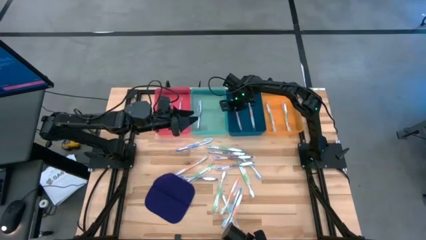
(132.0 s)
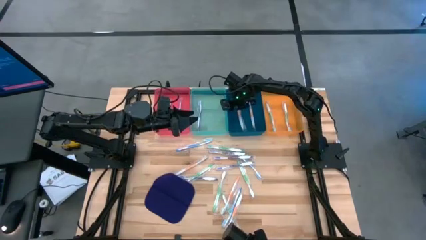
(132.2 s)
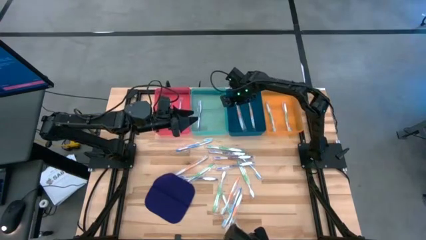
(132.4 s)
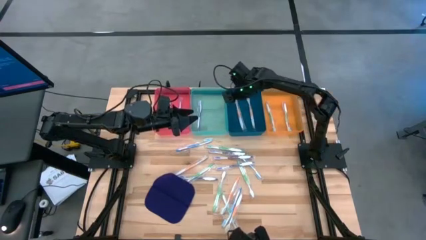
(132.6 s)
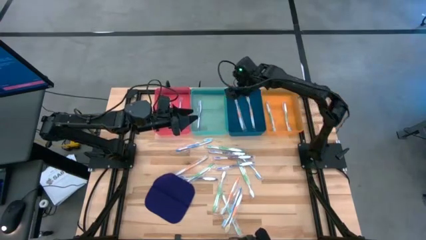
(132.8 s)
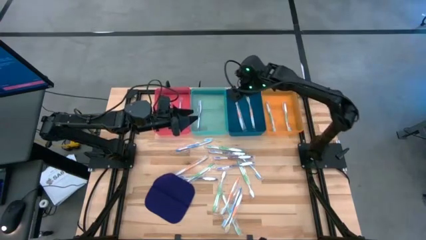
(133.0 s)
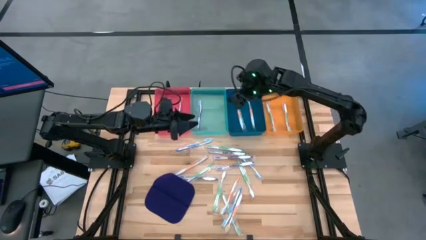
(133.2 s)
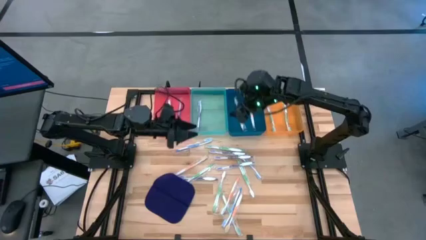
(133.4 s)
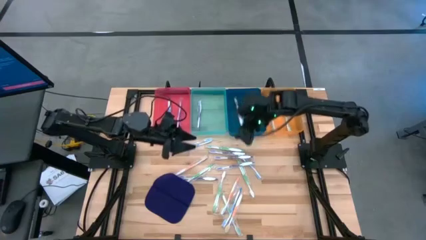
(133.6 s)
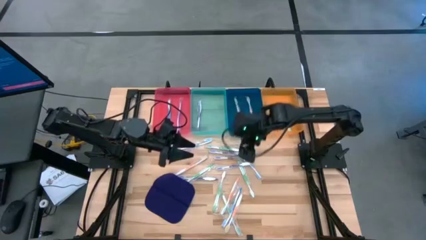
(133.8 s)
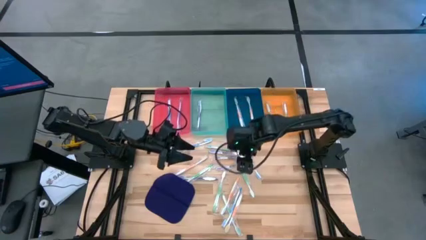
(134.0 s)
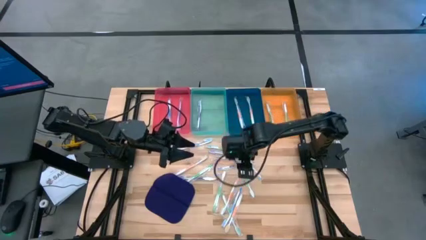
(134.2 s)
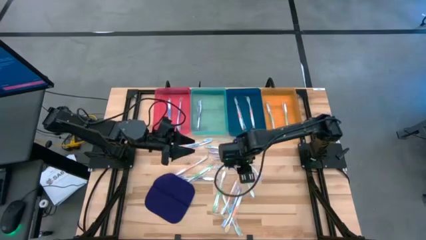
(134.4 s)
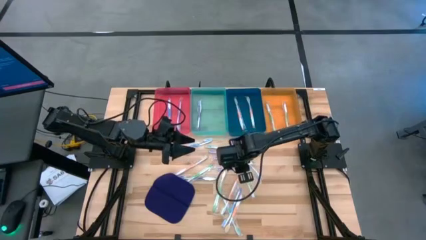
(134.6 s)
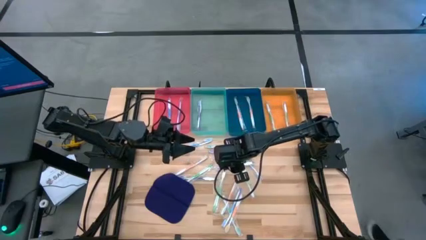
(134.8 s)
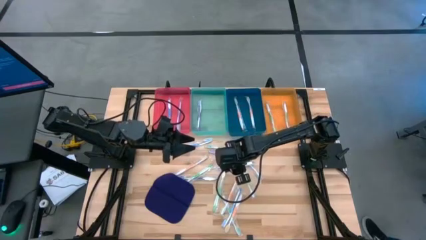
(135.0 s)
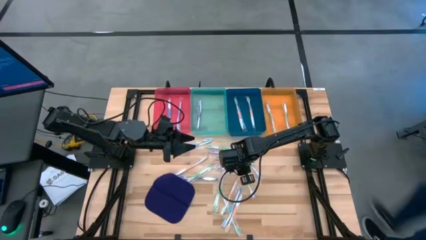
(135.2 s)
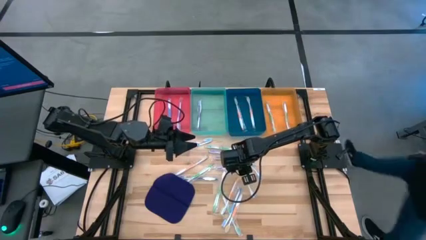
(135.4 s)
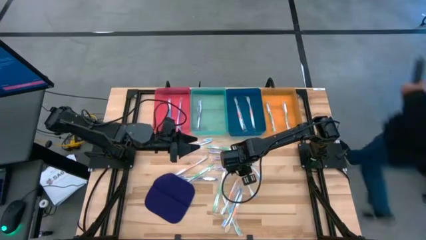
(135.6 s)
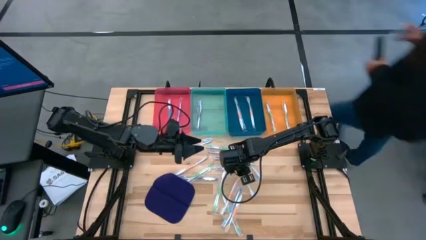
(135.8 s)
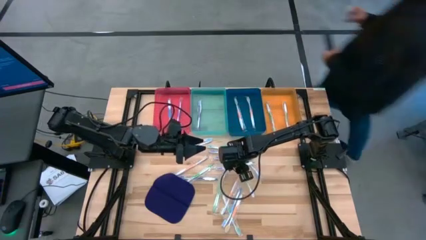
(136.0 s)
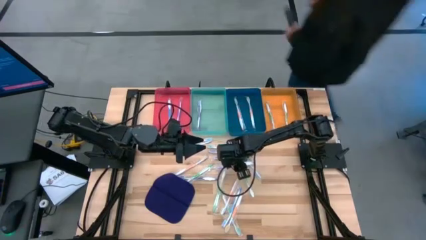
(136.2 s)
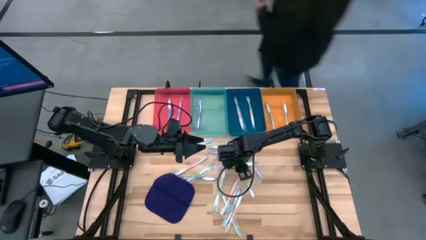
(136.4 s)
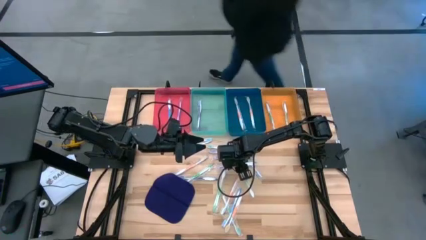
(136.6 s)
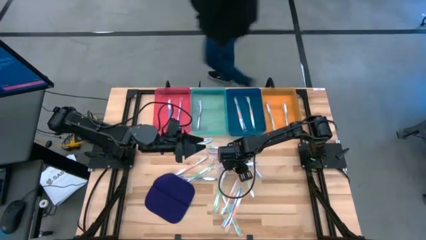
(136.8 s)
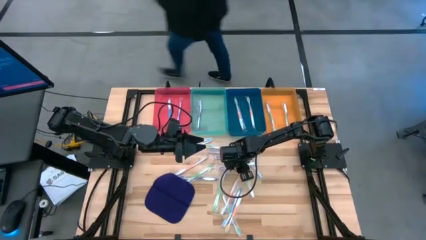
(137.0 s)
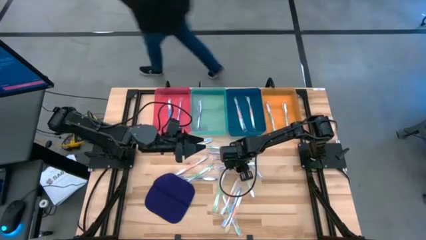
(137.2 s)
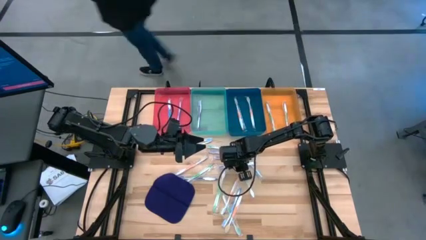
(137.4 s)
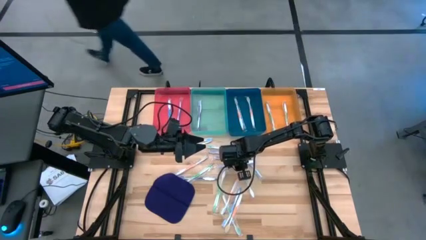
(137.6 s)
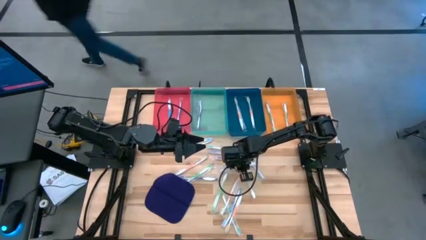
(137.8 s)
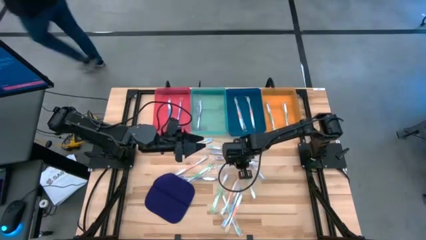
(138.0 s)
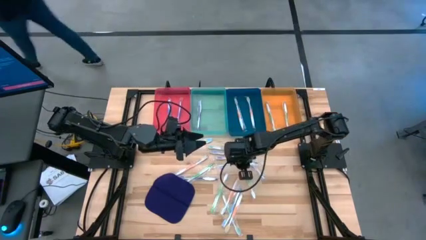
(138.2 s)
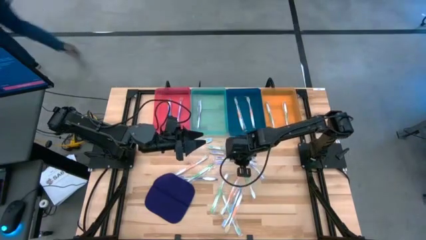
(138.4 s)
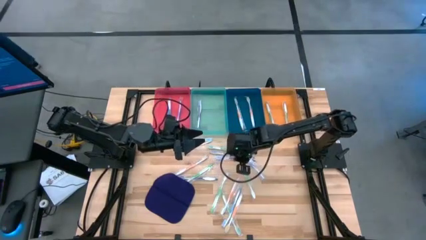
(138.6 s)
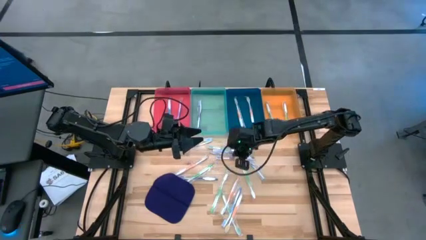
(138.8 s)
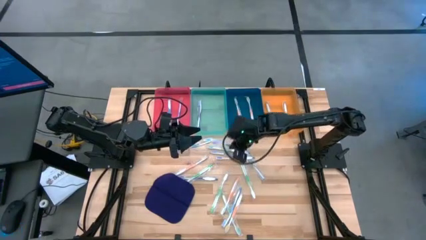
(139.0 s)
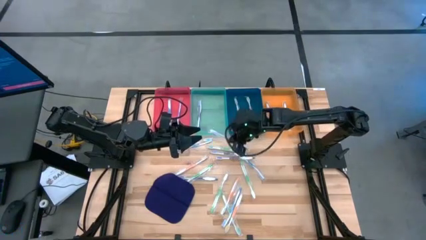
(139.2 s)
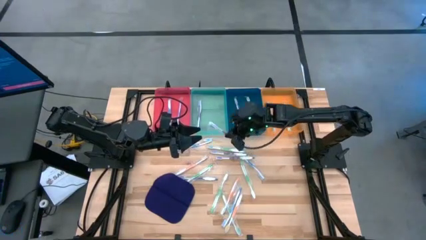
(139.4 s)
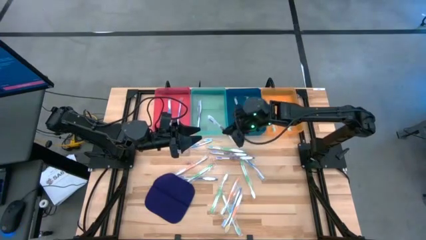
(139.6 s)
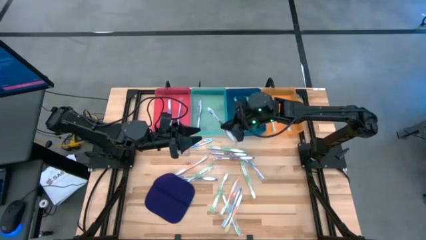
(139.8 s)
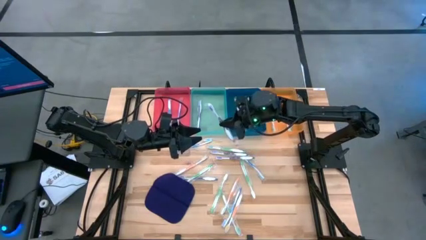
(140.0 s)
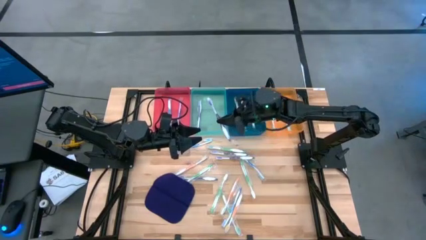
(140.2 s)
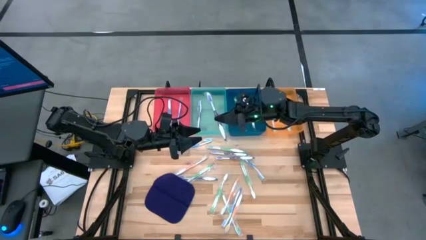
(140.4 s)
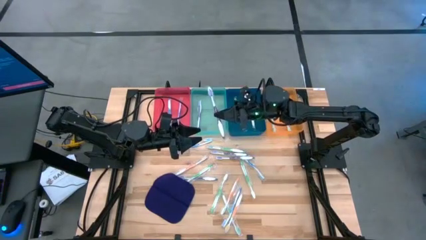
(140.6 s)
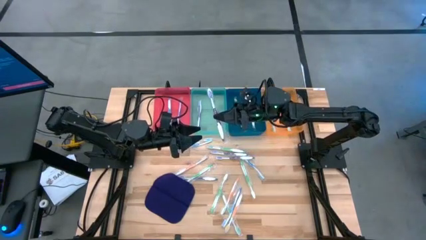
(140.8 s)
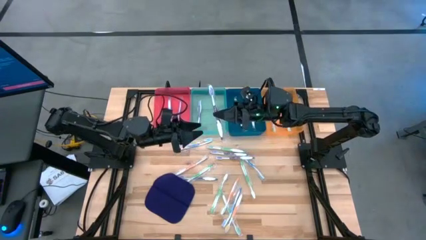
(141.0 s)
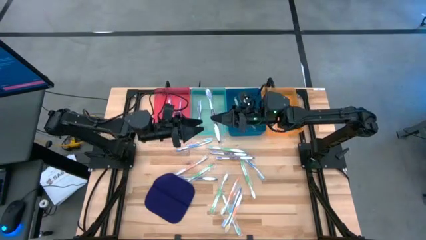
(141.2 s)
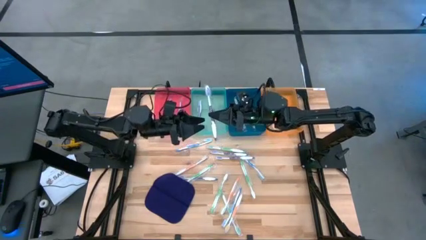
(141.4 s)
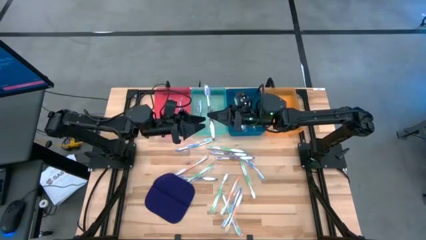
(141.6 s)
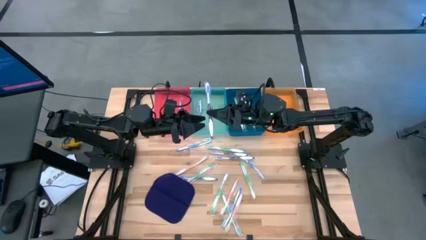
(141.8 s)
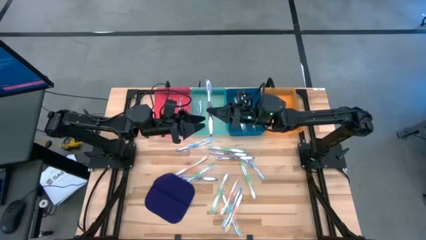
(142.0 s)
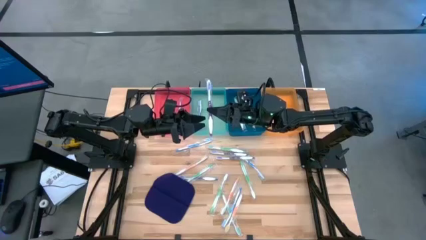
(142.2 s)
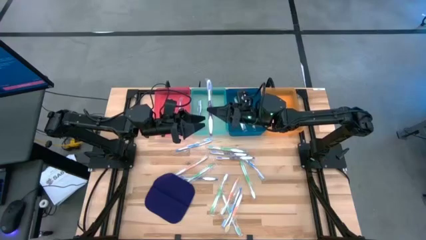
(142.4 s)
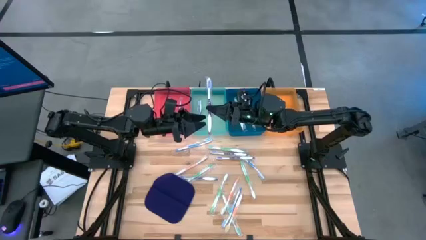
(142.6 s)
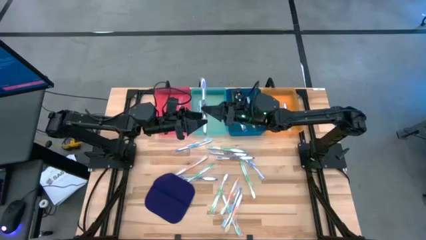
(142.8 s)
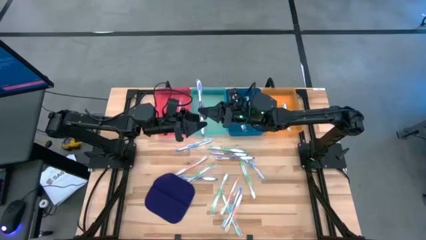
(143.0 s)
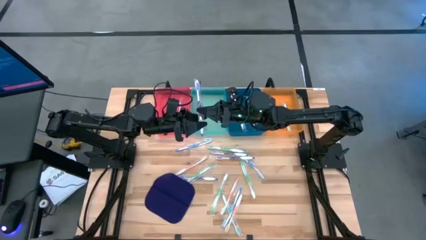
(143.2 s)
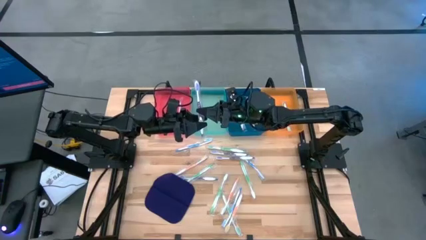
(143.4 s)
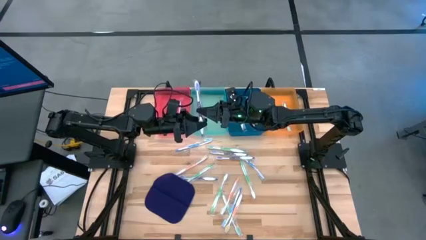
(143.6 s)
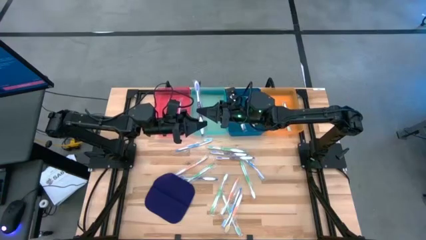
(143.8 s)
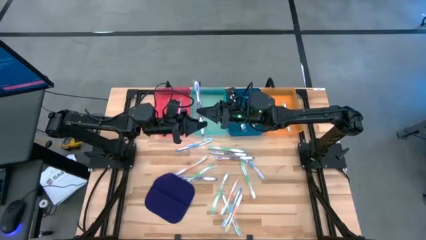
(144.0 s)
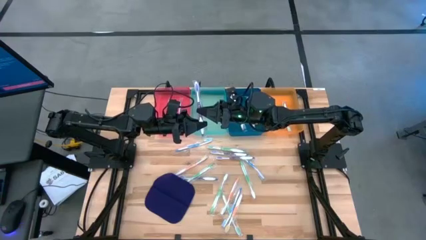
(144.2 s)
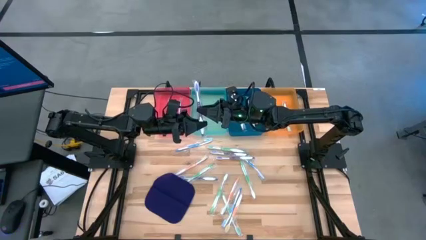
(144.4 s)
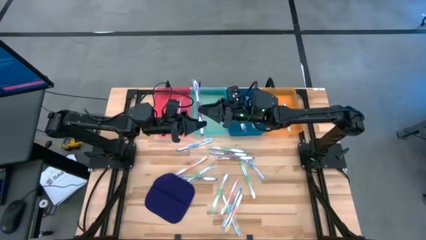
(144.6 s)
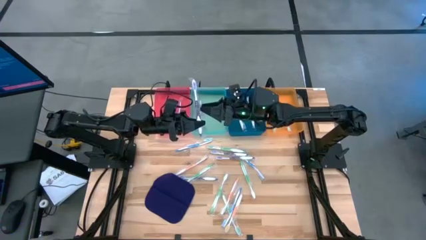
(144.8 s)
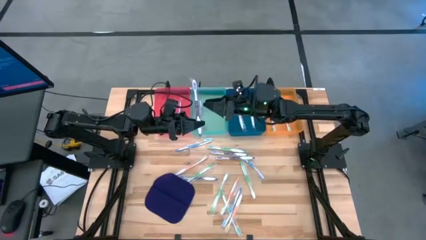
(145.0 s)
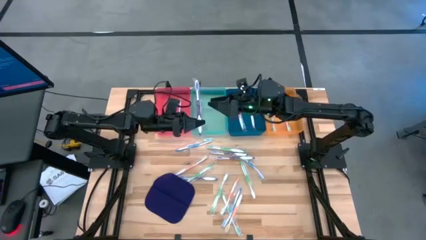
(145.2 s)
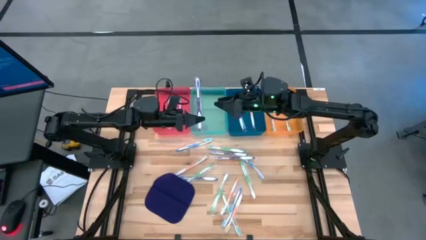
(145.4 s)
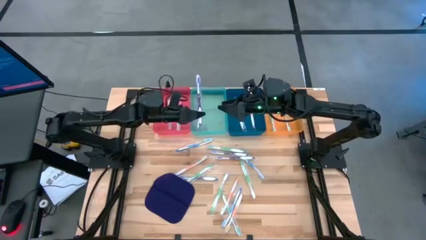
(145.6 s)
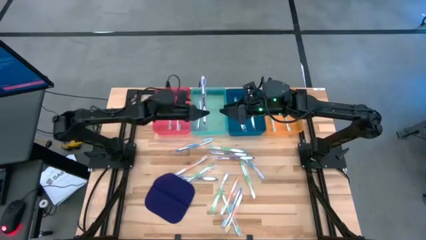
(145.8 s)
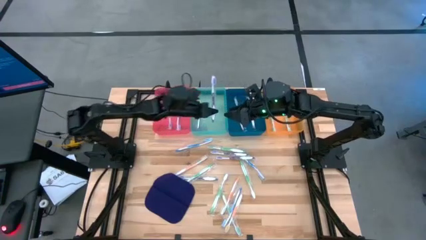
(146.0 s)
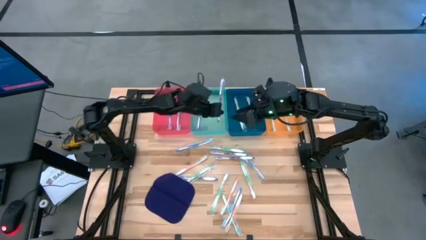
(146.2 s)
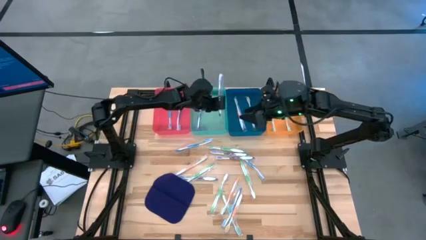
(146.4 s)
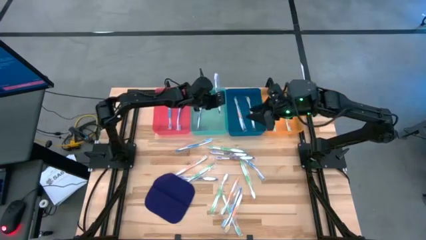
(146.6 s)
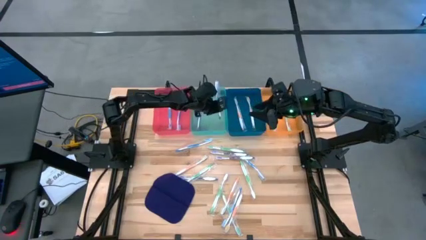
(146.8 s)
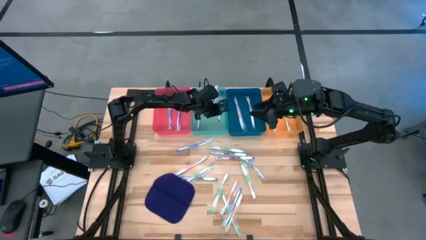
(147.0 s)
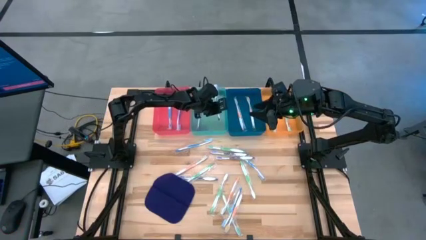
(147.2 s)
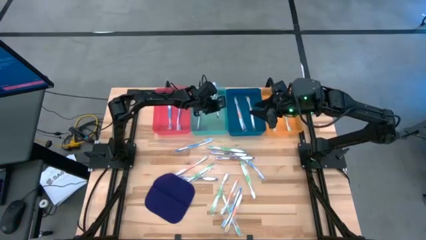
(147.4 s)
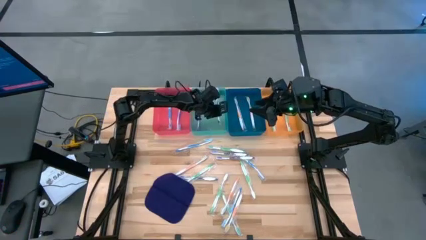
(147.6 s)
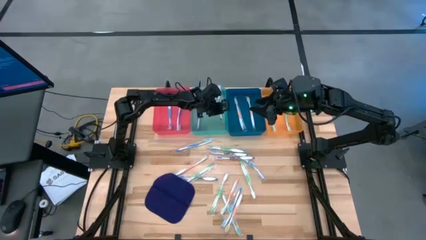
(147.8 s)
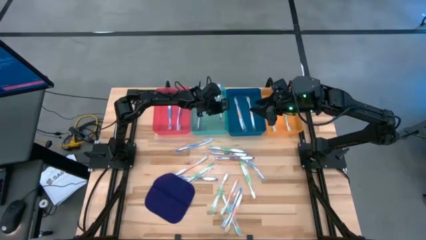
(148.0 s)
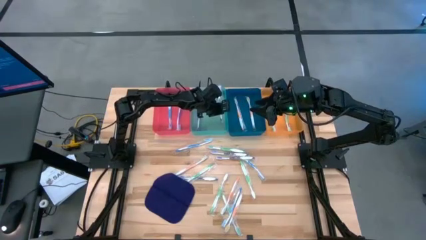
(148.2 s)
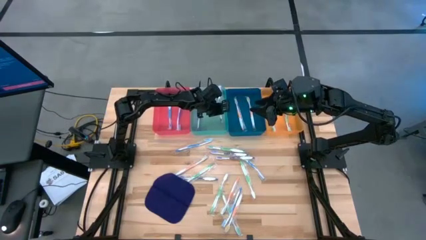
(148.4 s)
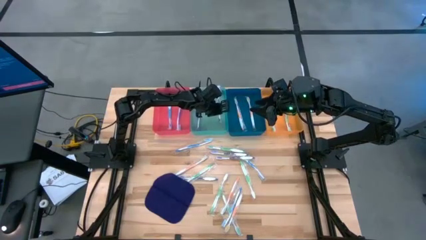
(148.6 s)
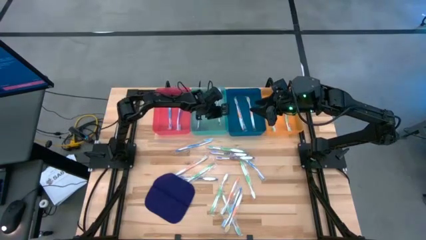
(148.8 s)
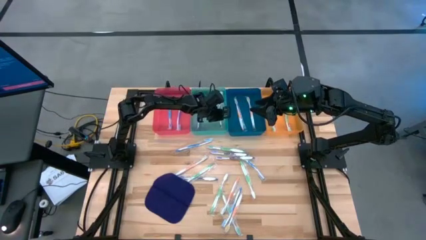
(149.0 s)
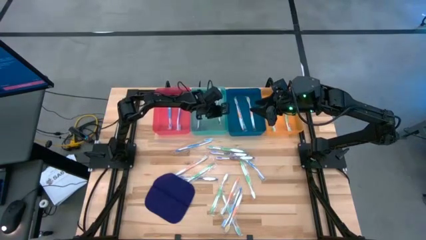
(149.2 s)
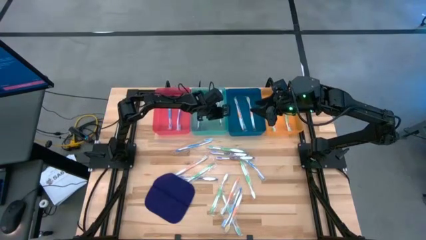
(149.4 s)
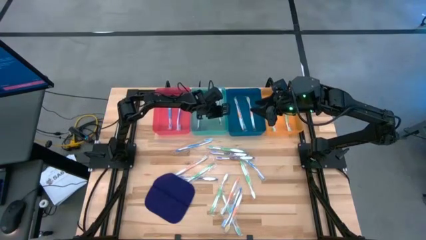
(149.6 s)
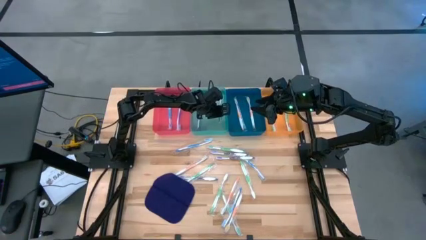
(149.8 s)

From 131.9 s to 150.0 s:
Task: Pick & Place Toothbrushes
Put the purple toothbrush into the green bin
